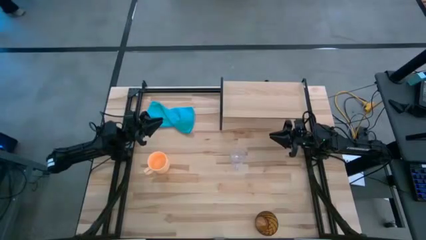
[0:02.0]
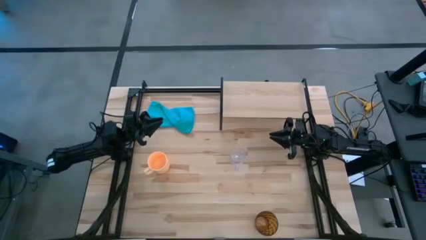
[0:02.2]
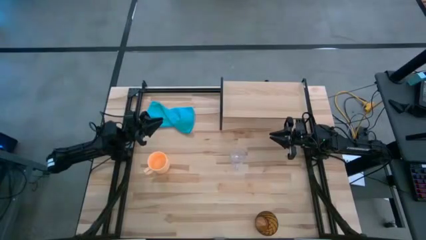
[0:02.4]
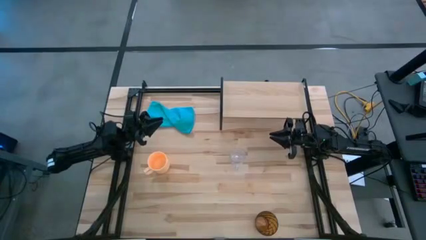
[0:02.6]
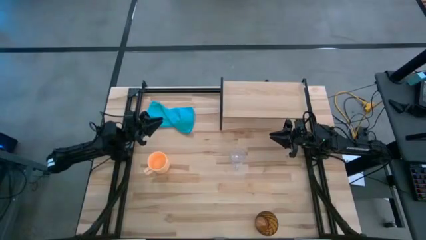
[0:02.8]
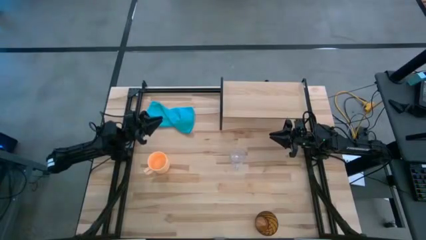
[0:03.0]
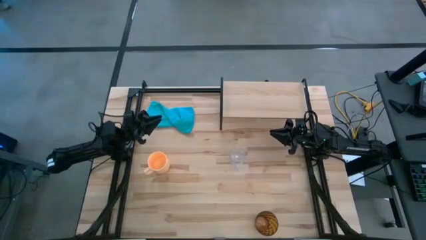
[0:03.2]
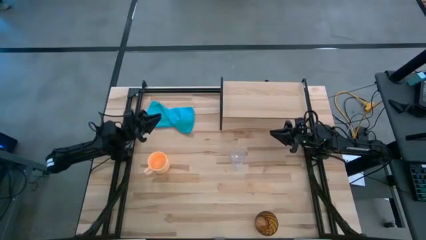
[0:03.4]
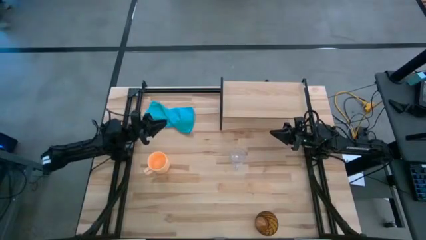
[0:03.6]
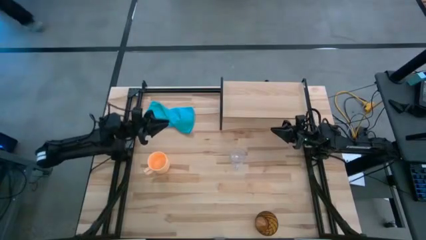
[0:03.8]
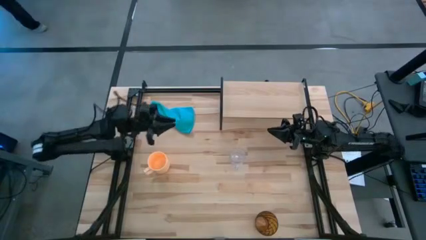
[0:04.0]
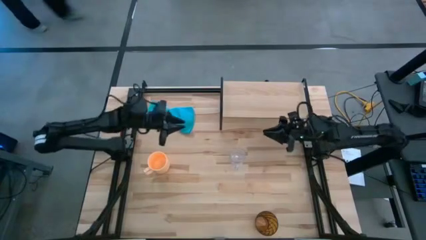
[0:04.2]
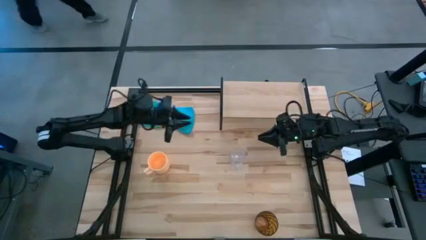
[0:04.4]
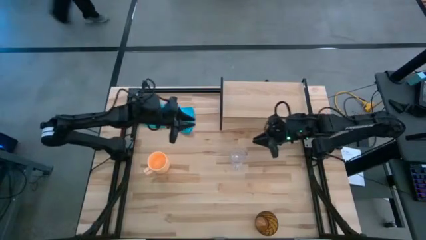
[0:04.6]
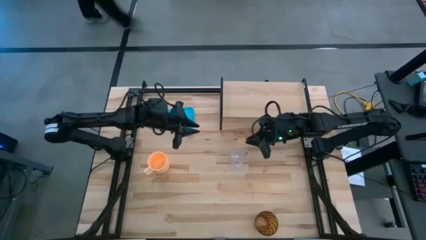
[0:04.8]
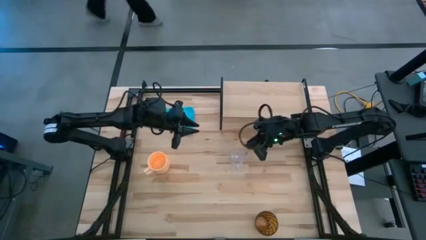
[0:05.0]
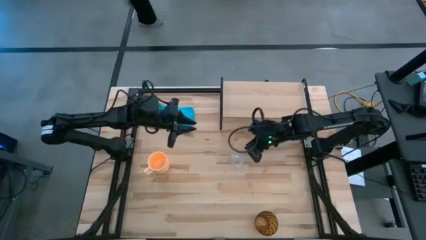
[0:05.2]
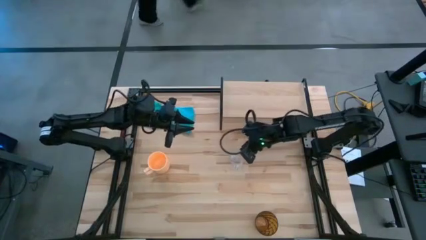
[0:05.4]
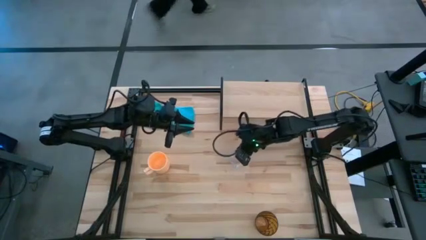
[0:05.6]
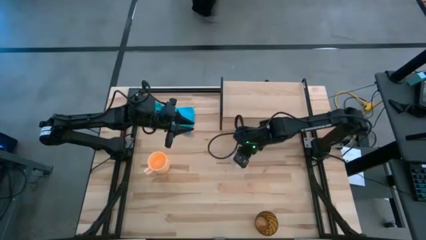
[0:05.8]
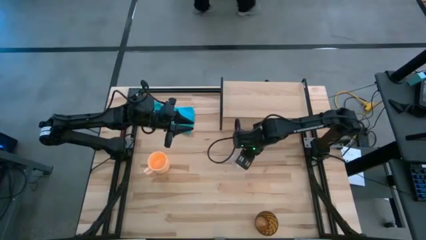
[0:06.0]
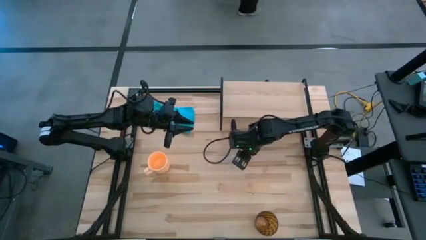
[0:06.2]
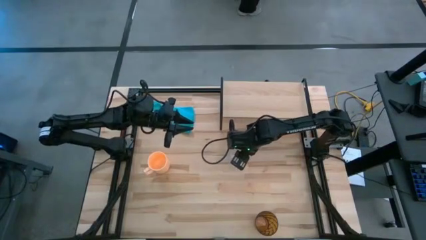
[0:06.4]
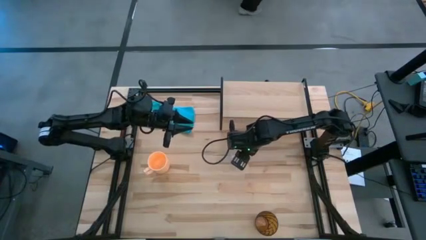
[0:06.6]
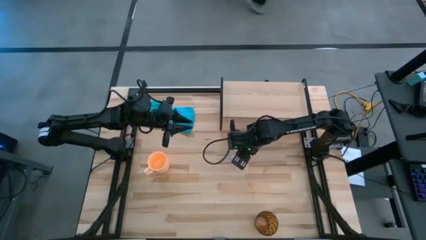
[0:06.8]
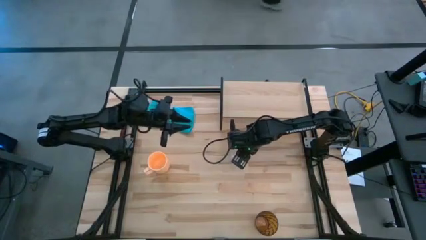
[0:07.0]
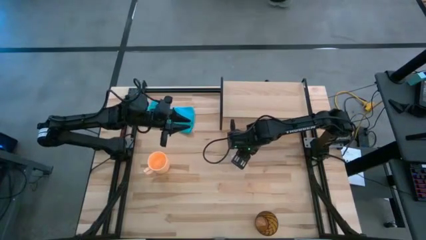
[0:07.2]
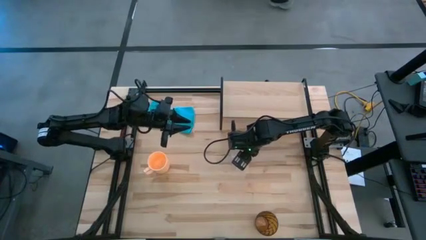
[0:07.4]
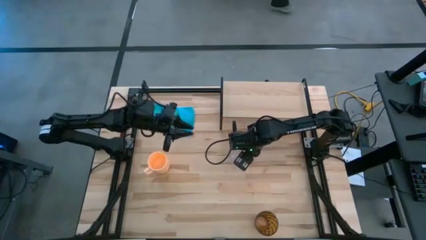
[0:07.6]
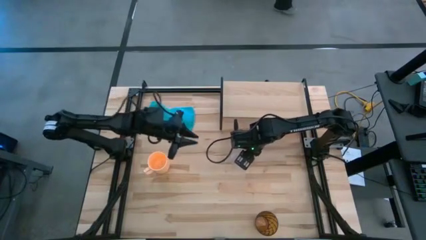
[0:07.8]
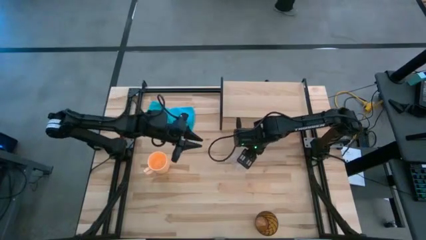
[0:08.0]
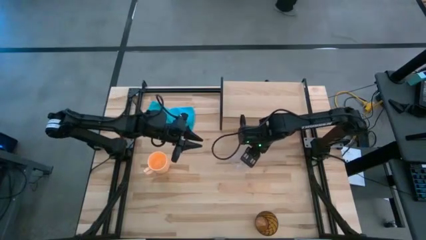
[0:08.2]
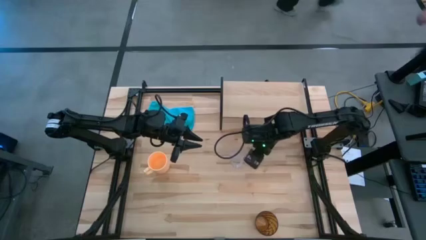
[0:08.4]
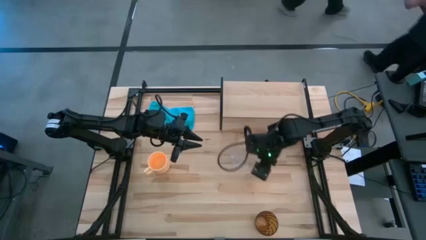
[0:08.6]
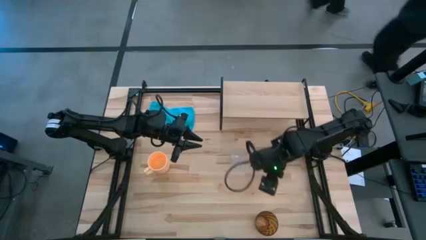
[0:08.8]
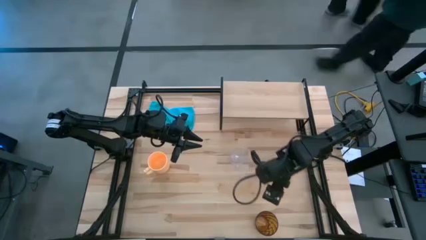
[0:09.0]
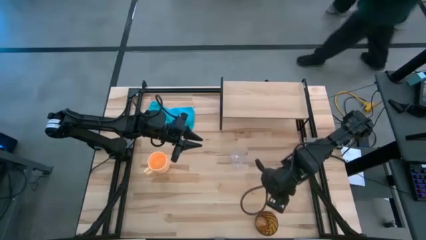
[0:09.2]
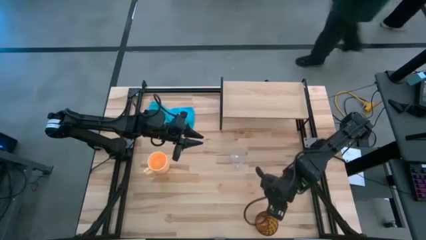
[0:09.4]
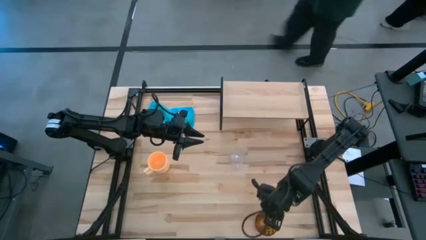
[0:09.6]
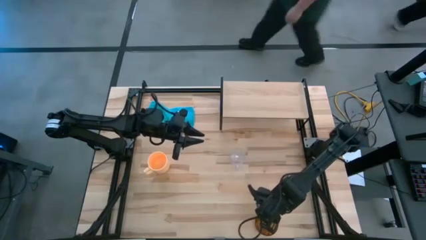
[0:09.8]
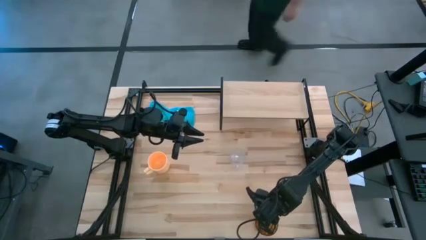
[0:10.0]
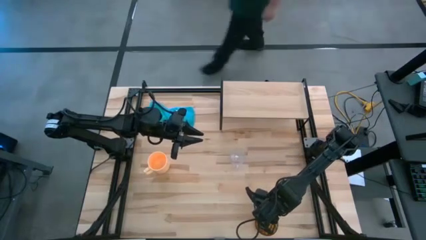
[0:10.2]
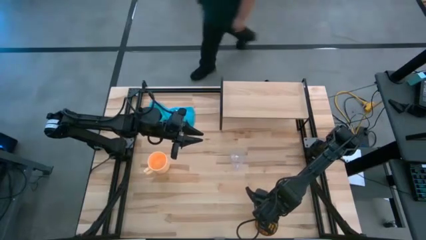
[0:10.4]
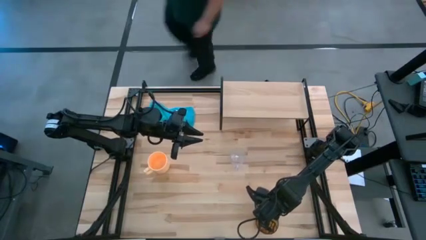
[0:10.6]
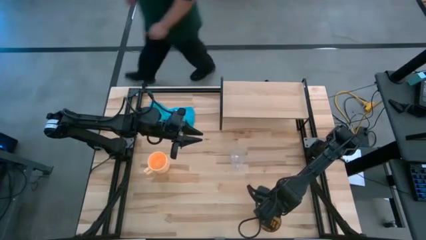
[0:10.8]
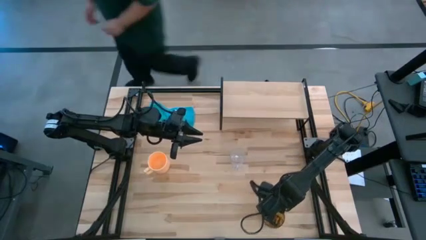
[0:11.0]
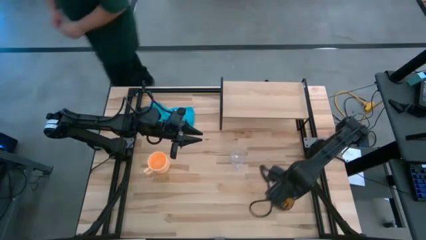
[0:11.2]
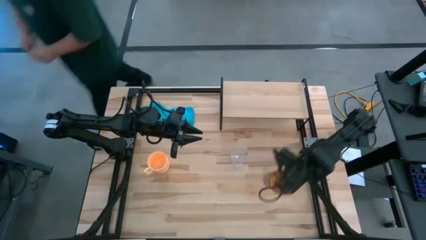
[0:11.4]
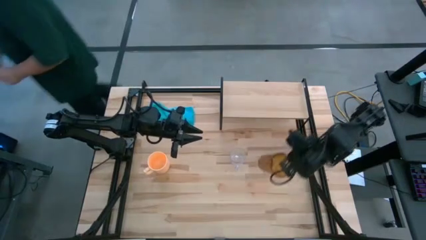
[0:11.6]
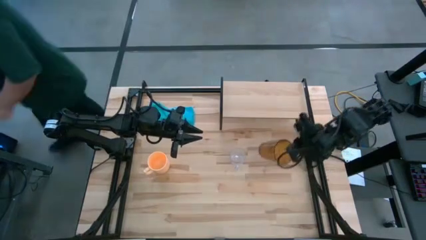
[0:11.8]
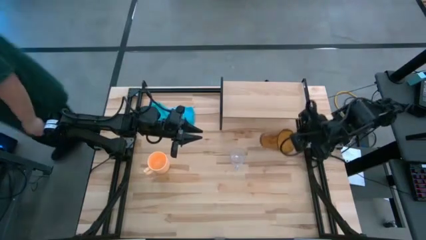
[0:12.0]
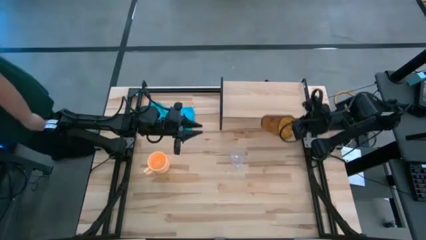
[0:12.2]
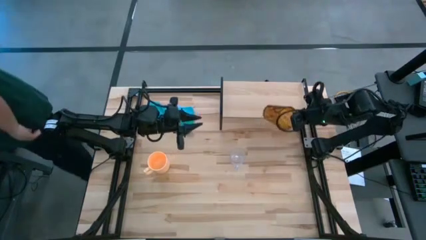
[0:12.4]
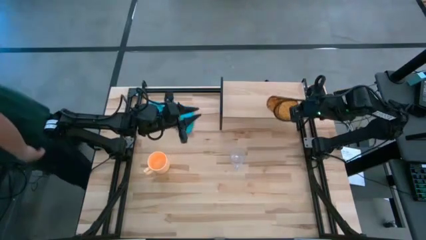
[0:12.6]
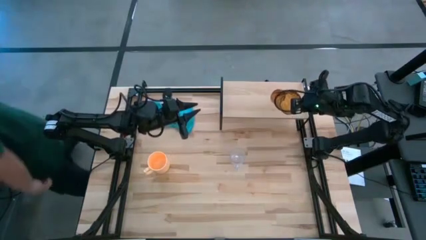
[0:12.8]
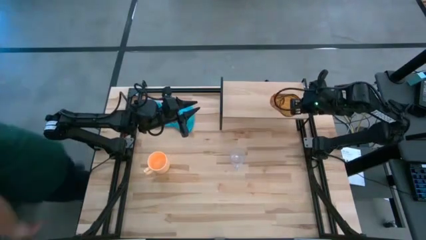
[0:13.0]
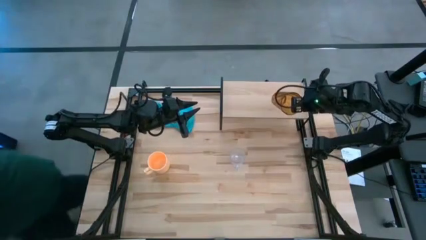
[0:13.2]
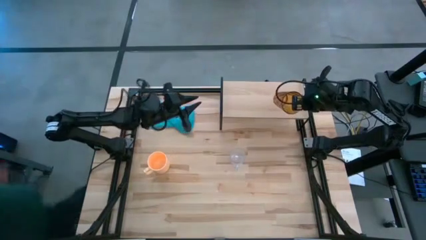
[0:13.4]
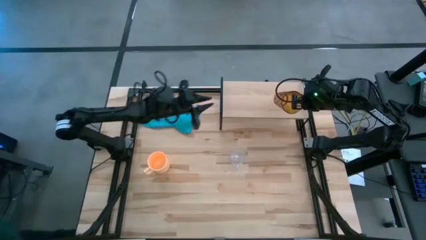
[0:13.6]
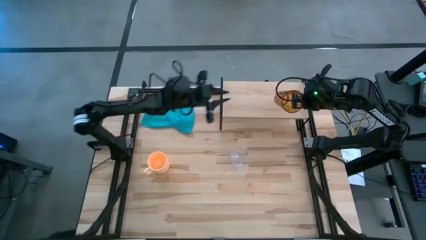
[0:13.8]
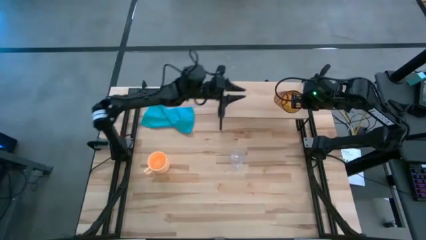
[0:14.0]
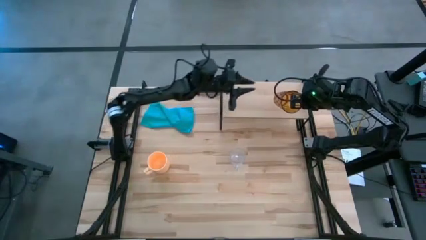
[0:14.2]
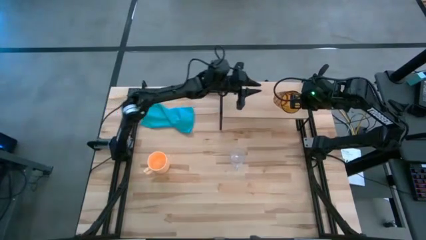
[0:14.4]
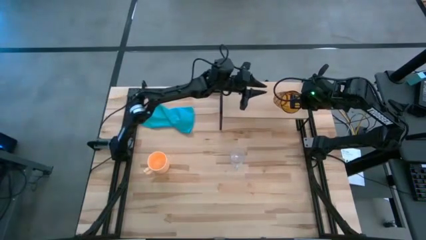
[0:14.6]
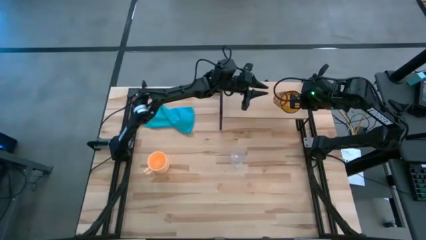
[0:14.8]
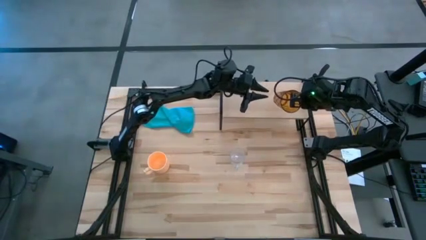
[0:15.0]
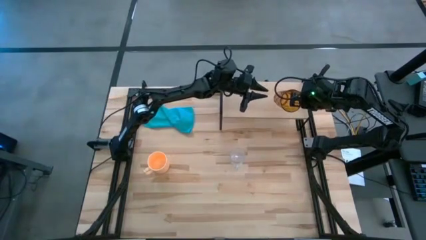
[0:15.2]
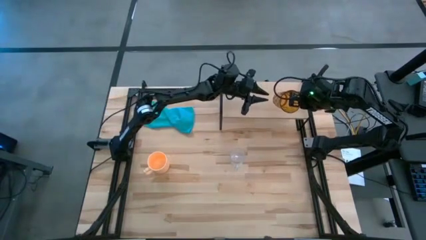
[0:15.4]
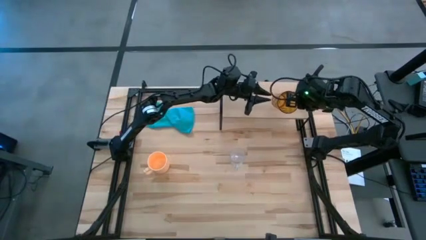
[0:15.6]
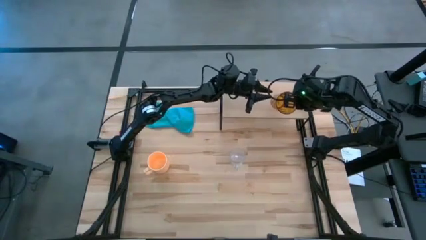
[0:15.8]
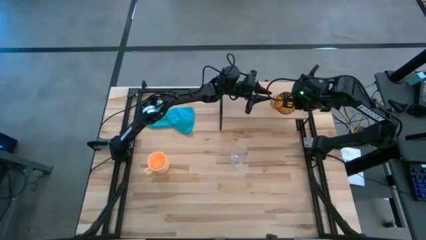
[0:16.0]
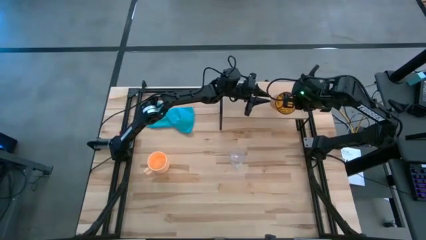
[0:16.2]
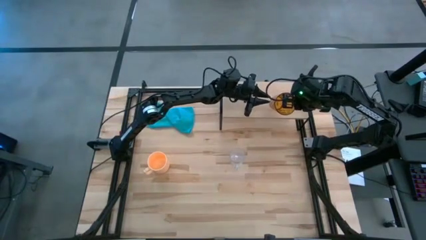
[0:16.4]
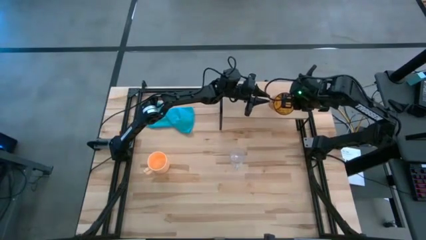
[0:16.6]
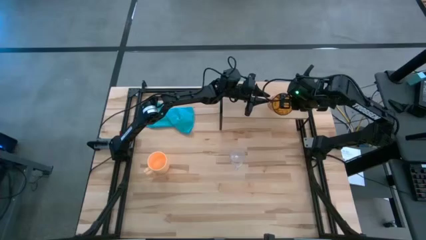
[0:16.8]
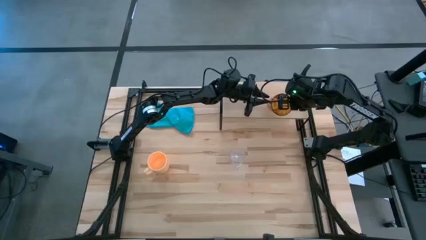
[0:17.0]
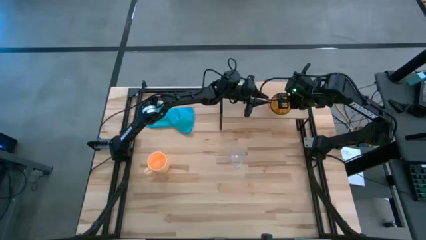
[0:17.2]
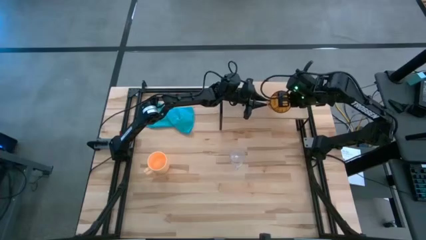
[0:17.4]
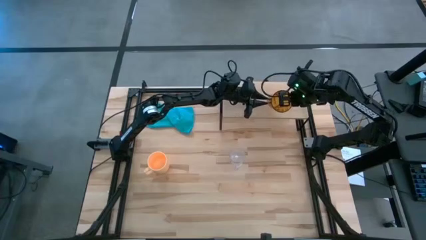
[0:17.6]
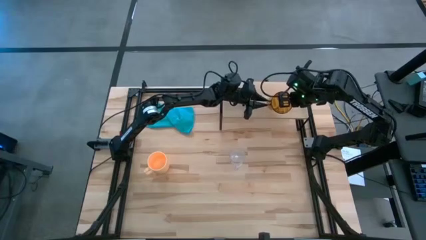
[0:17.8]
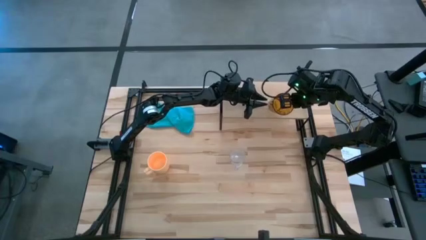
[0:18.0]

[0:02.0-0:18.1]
Task: Stack small to large cups/mugs on shelf
Put the brown glass on the shelf
